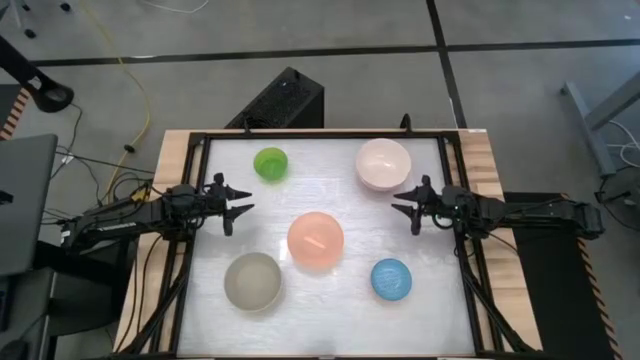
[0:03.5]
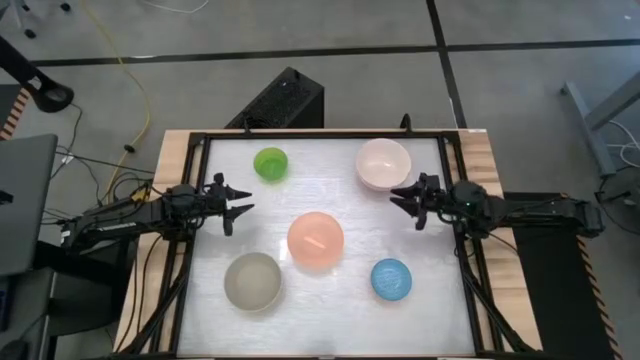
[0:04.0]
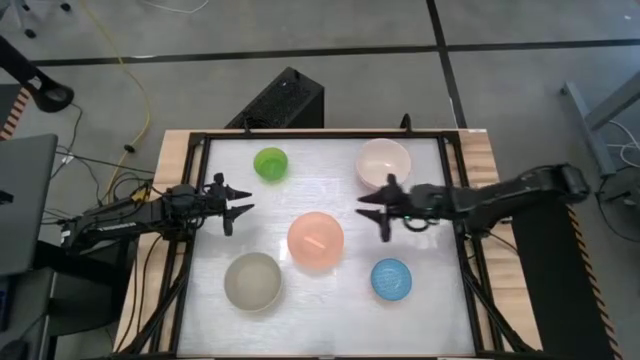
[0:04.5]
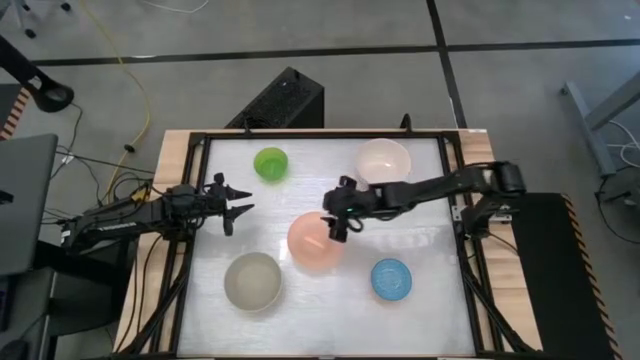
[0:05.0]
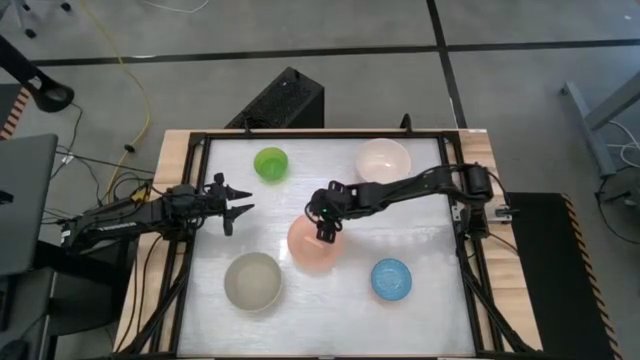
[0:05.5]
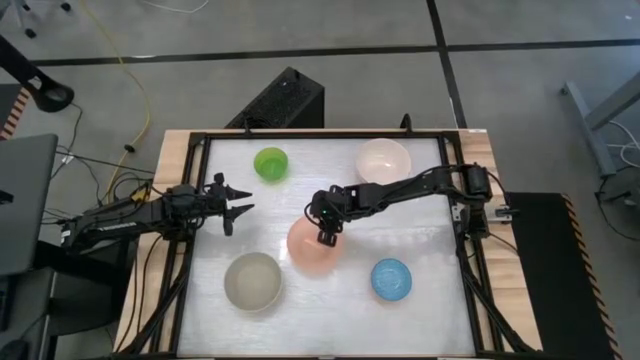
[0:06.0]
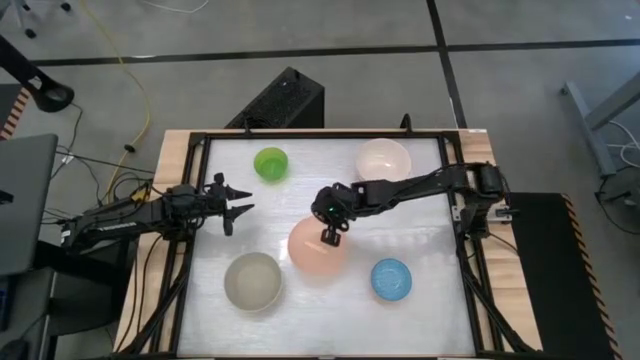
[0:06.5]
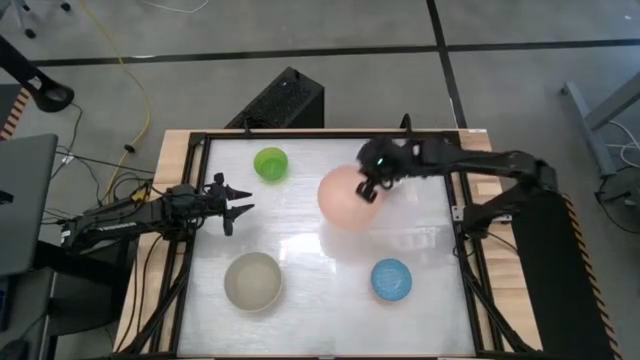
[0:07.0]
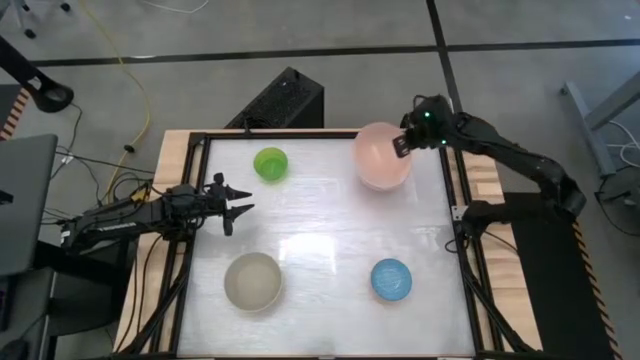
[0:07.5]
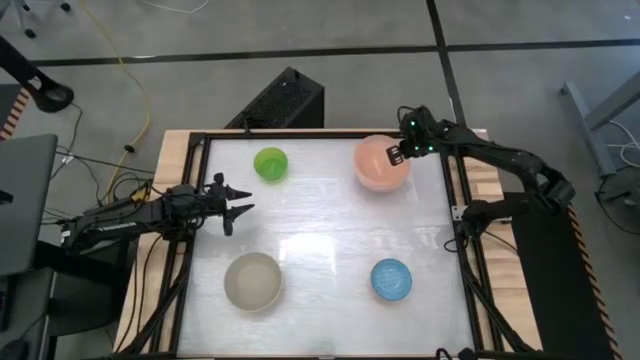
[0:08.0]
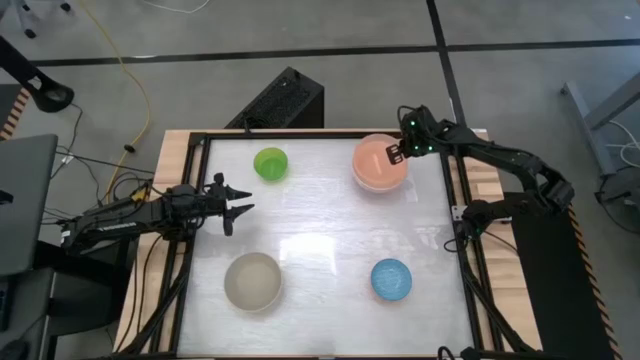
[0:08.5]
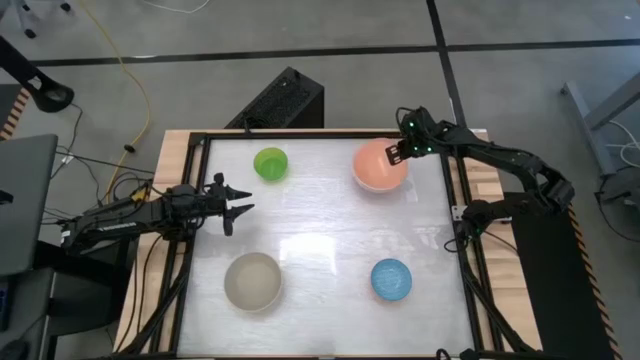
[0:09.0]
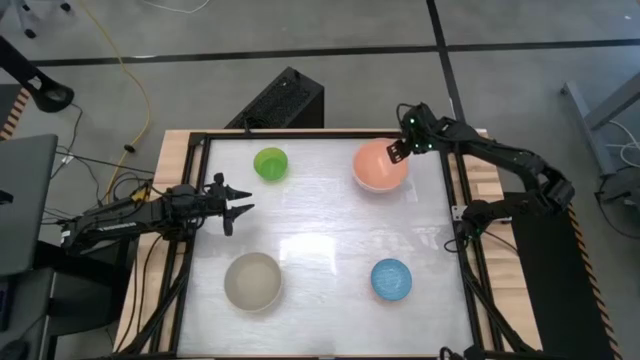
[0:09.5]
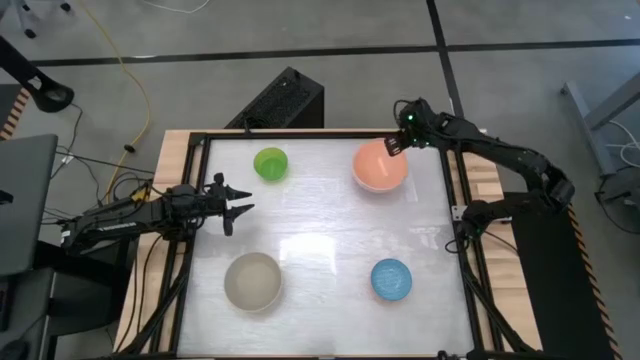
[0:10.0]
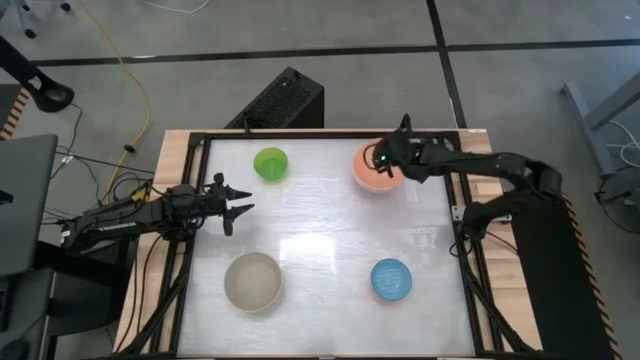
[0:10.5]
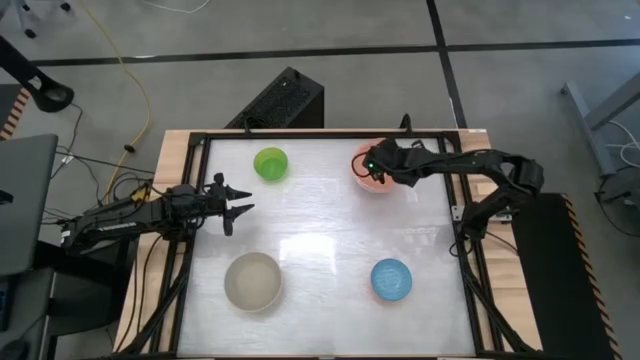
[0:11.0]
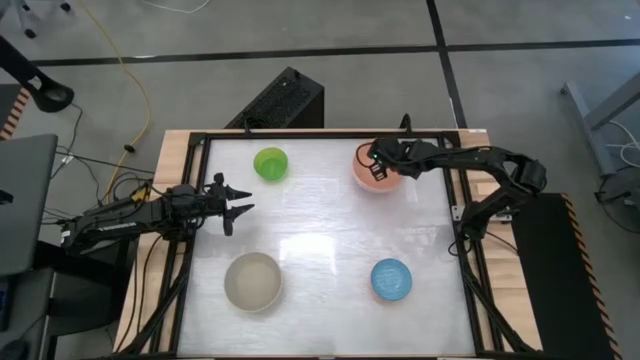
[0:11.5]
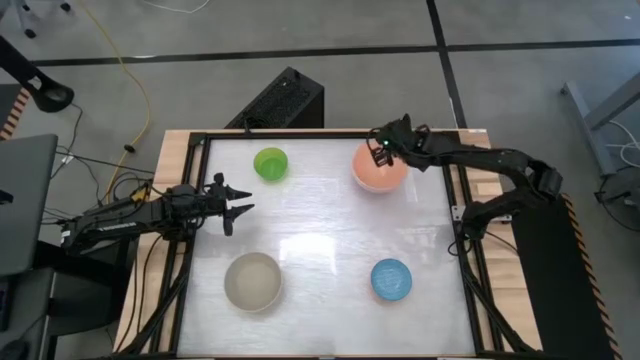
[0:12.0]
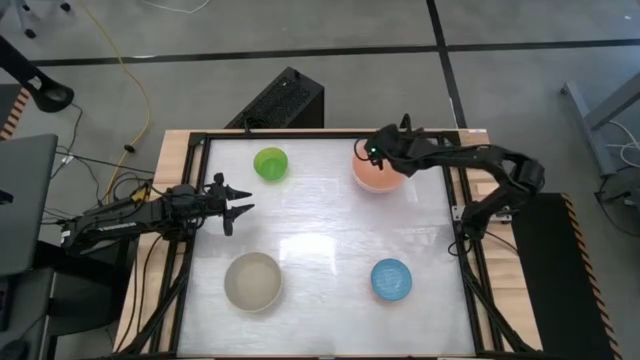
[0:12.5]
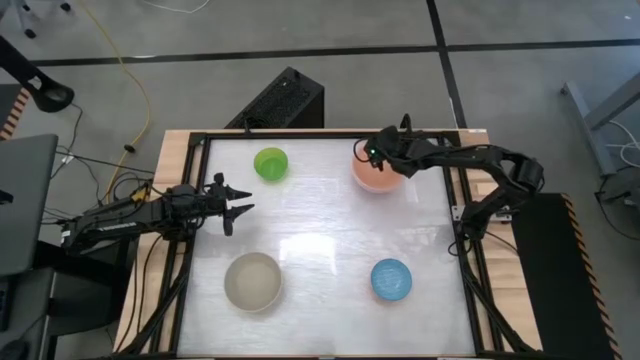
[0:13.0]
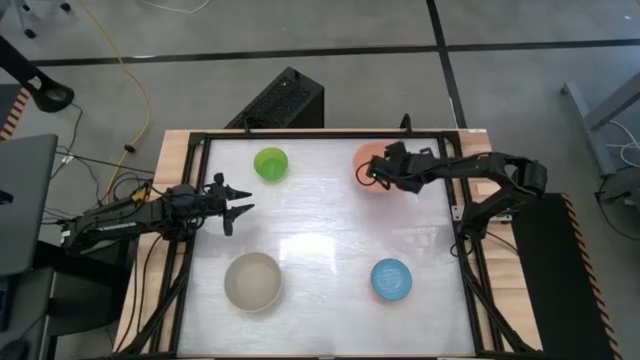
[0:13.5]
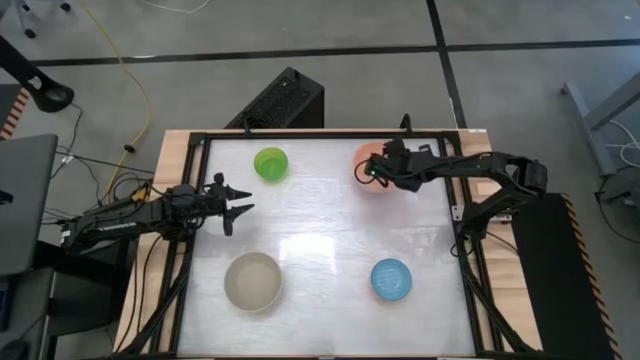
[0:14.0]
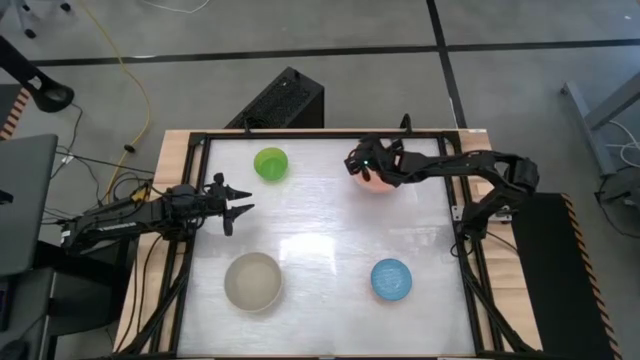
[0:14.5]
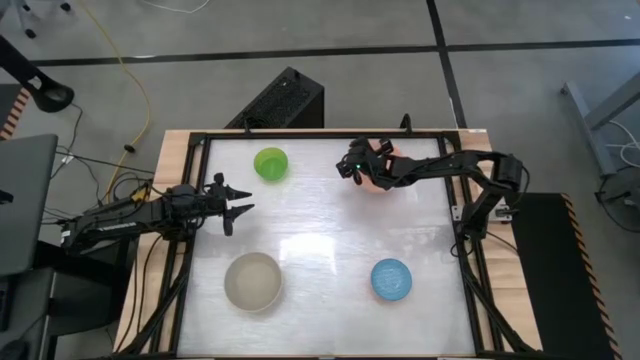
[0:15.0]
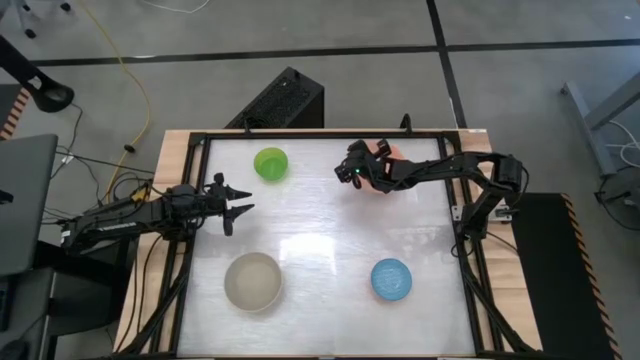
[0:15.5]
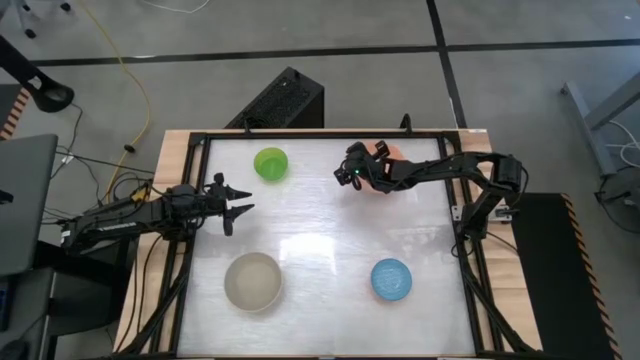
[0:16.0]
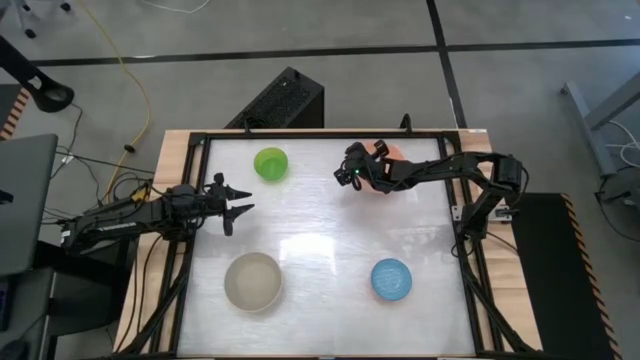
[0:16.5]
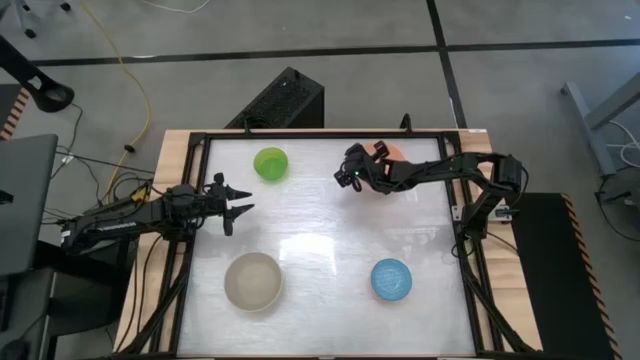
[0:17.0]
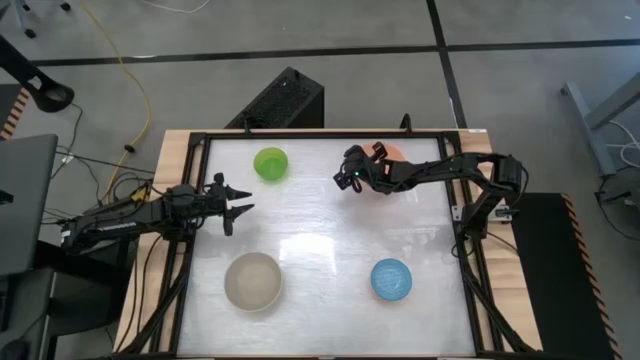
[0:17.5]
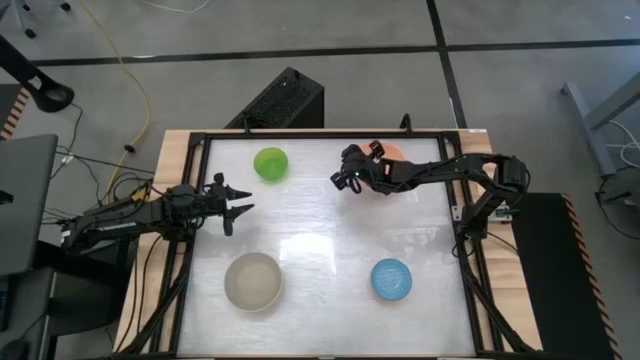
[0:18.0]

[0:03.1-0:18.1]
Stack the light orange bowl on top of the white bowl

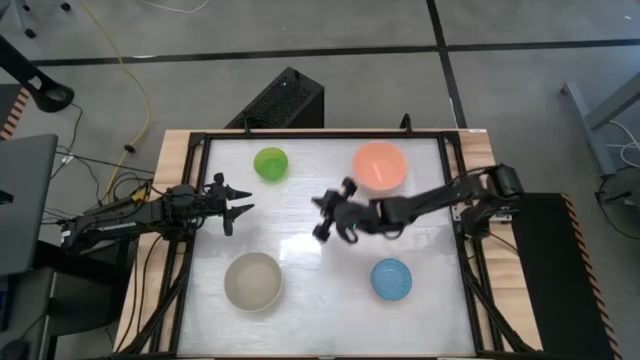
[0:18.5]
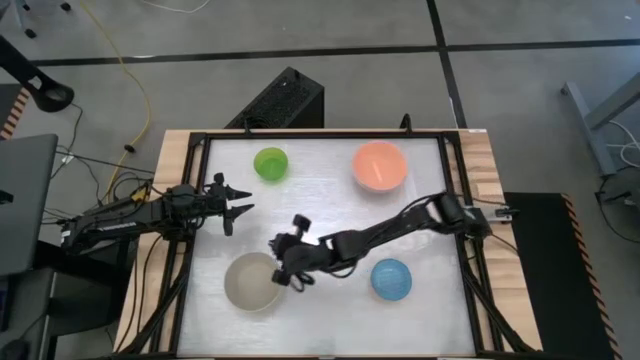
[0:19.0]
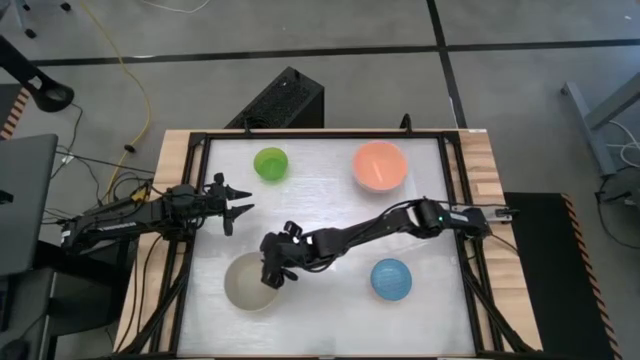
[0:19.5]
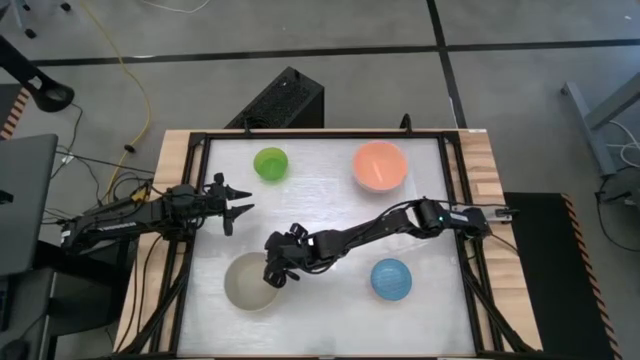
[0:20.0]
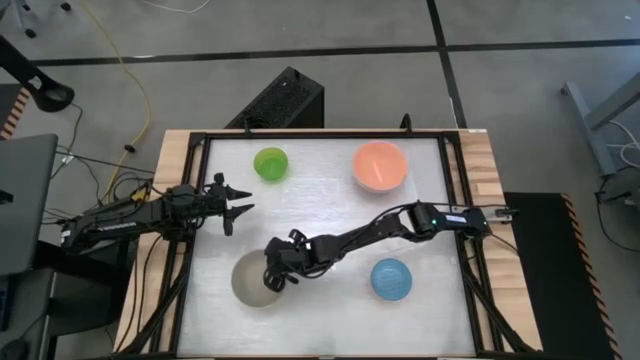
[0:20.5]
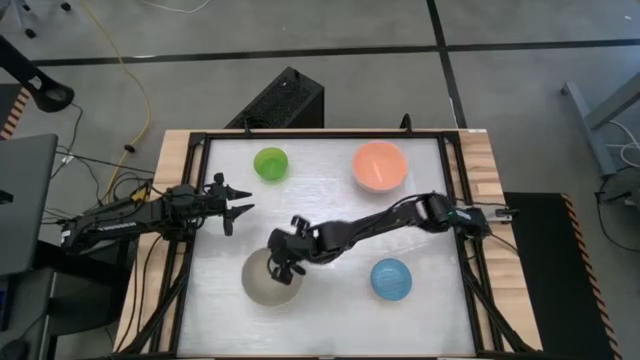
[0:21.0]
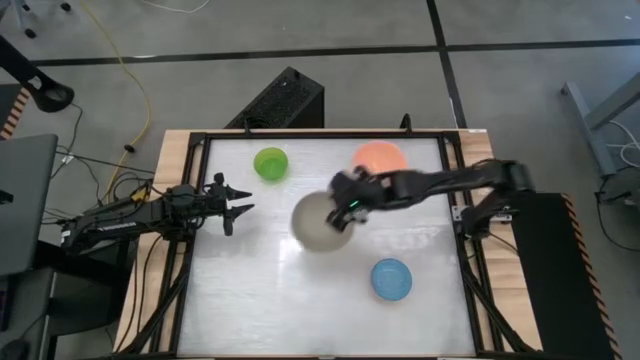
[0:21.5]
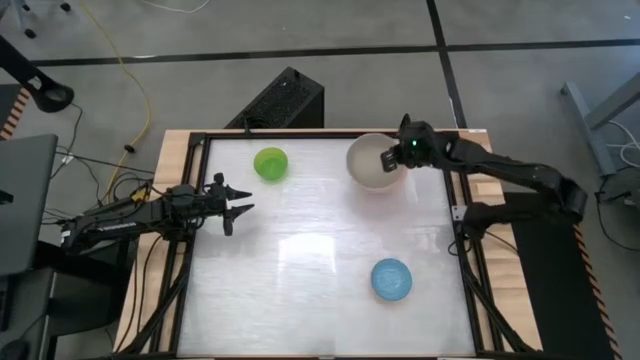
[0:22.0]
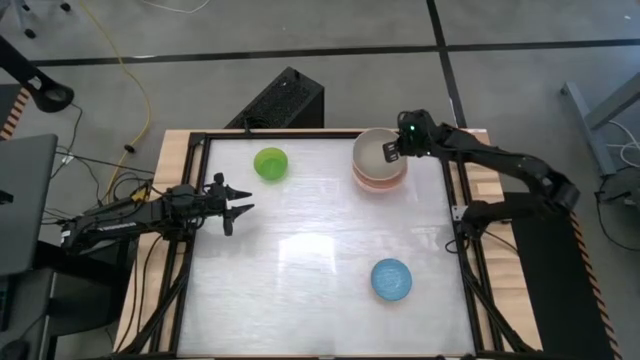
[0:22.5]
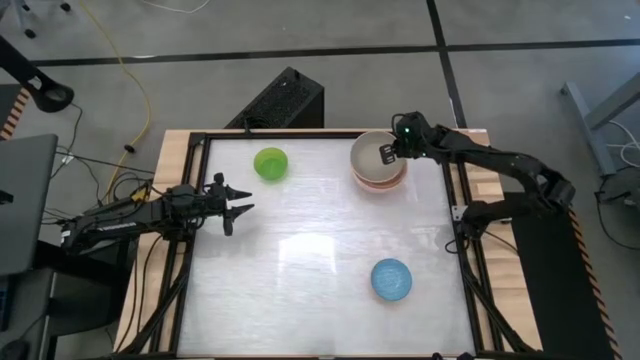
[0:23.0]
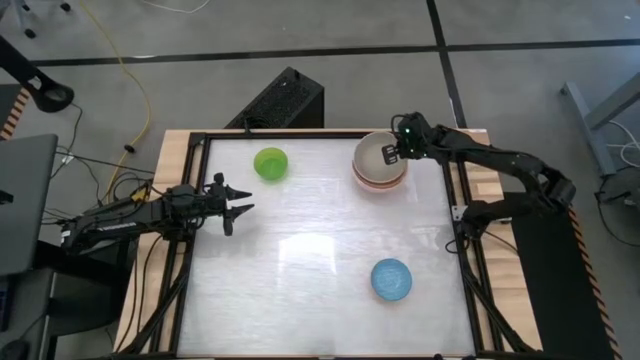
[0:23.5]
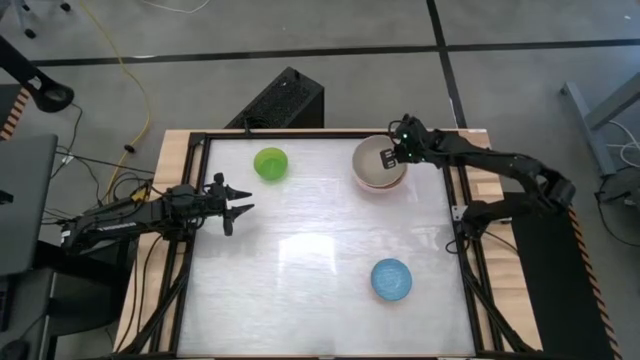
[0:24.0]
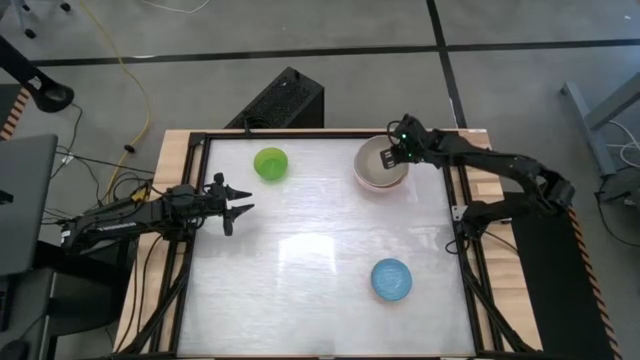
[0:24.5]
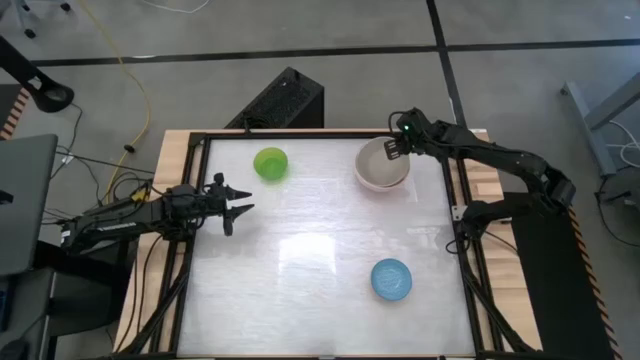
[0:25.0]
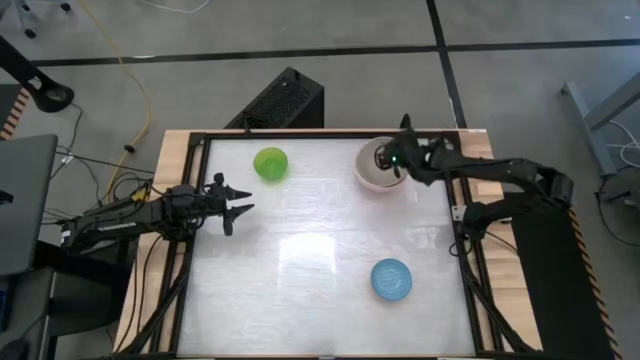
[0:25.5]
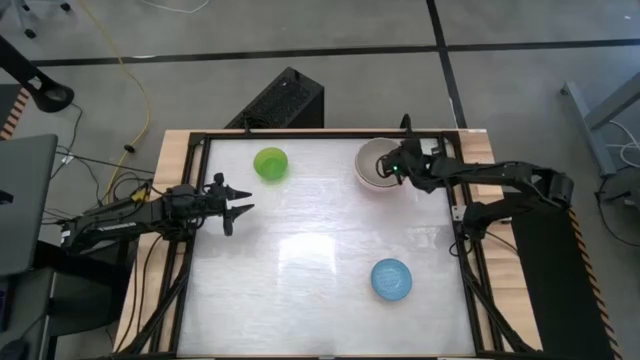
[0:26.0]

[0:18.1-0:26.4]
Stack the gray bowl on top of the light orange bowl
